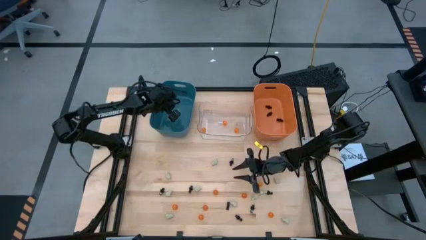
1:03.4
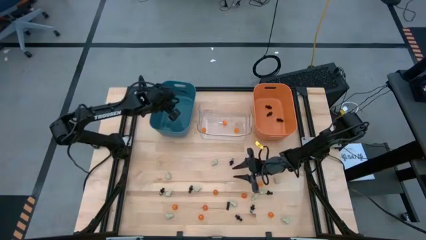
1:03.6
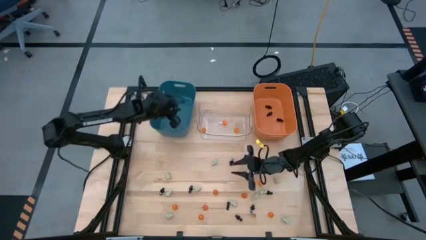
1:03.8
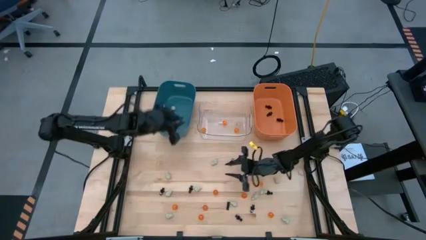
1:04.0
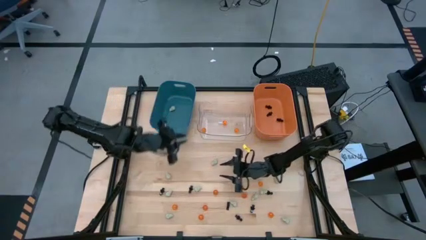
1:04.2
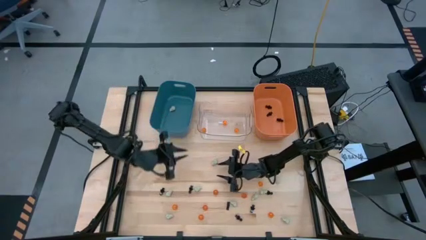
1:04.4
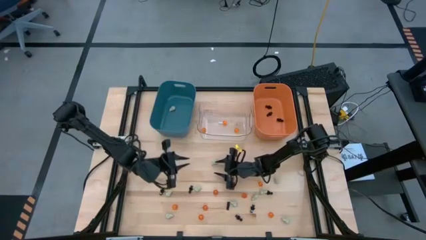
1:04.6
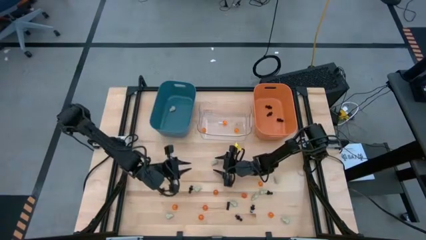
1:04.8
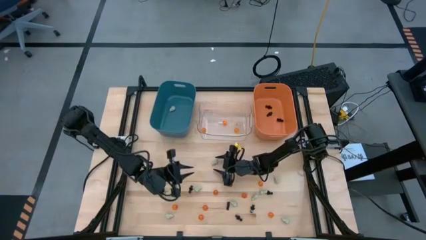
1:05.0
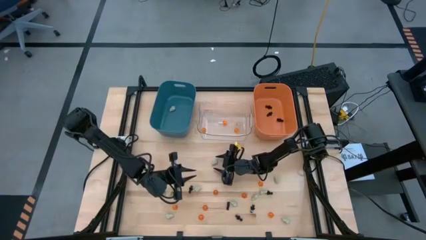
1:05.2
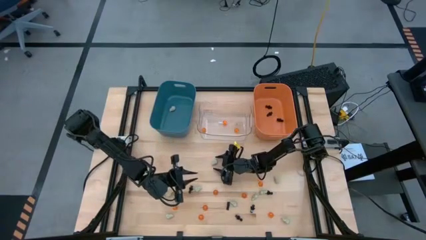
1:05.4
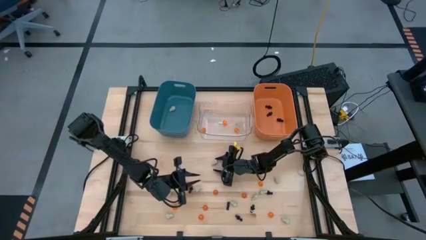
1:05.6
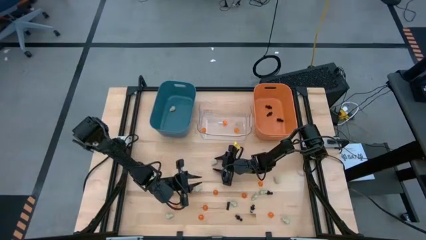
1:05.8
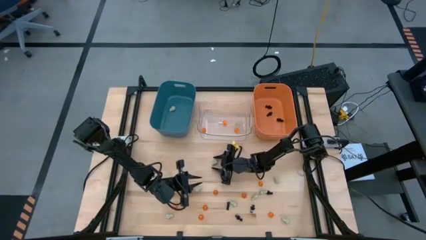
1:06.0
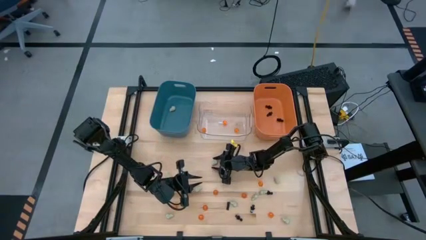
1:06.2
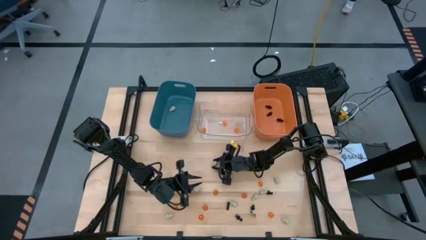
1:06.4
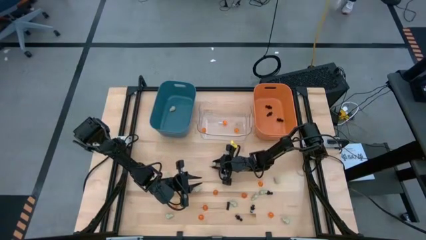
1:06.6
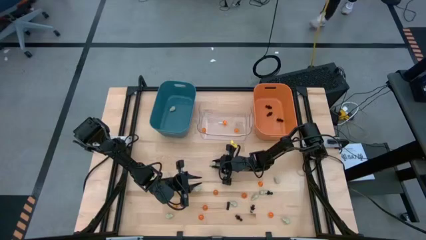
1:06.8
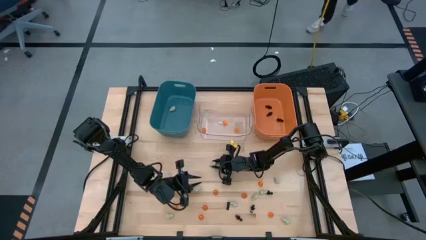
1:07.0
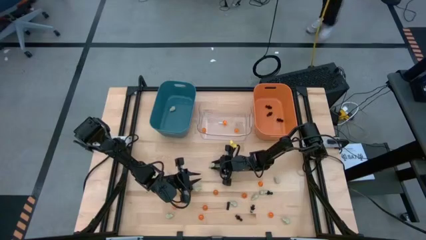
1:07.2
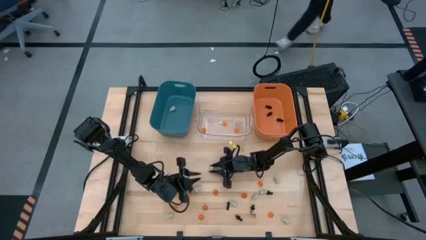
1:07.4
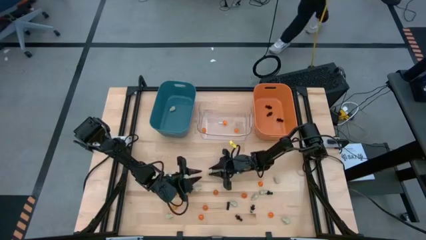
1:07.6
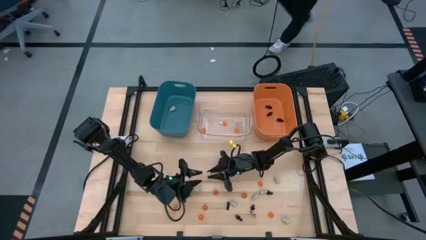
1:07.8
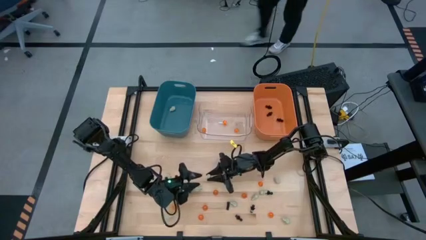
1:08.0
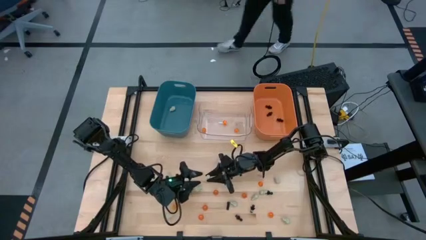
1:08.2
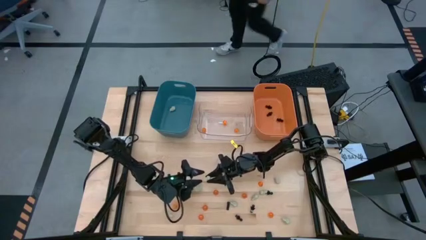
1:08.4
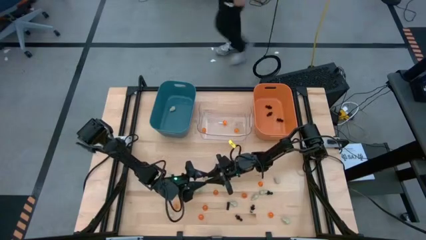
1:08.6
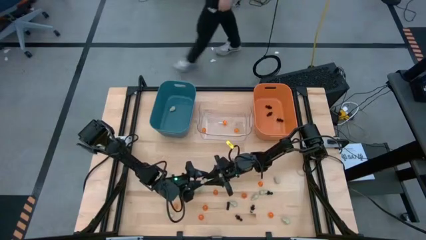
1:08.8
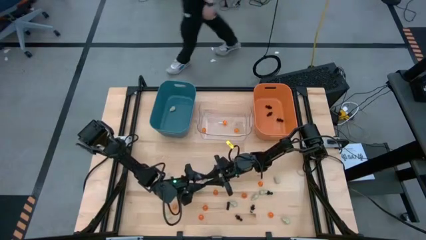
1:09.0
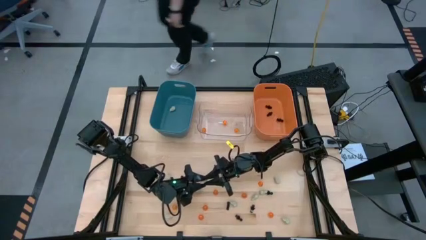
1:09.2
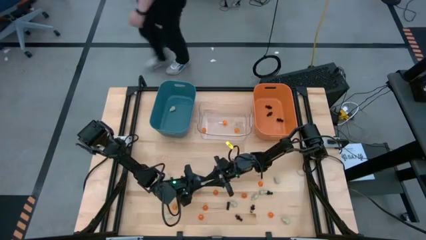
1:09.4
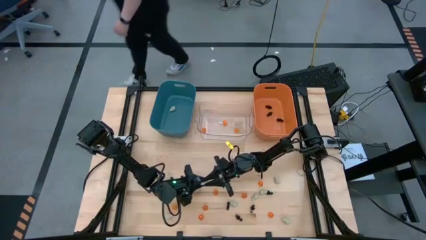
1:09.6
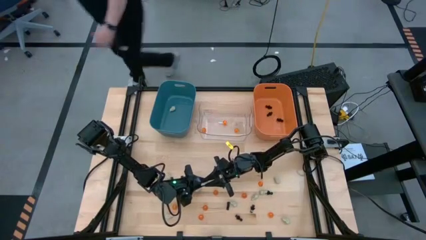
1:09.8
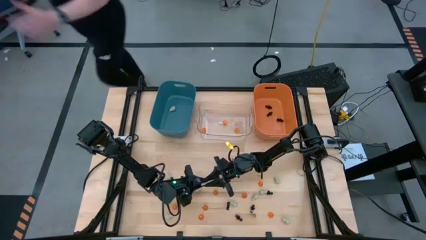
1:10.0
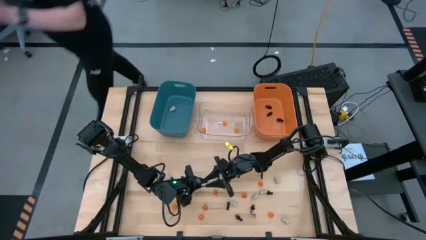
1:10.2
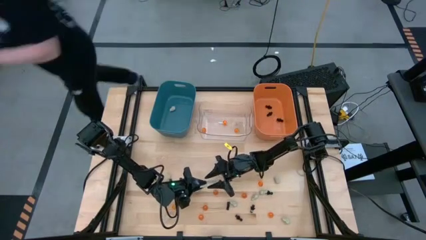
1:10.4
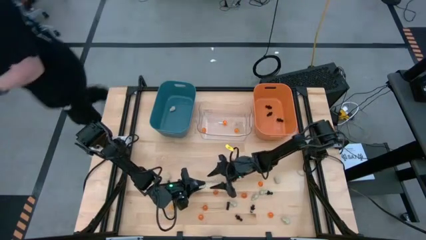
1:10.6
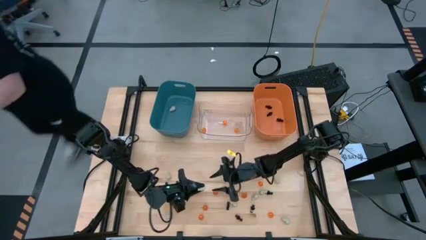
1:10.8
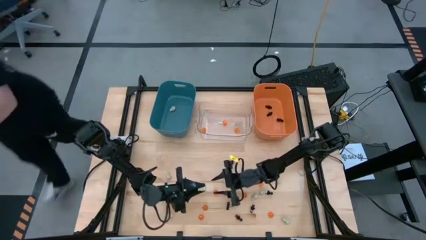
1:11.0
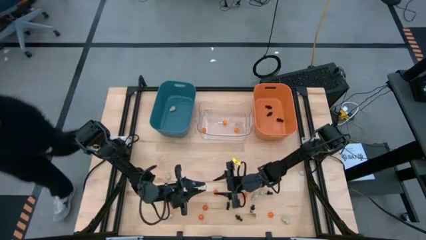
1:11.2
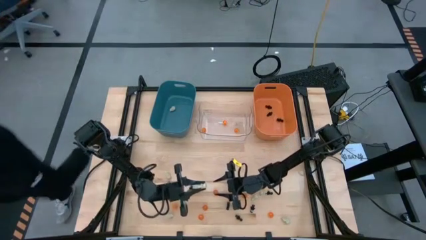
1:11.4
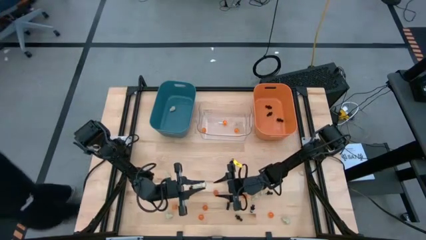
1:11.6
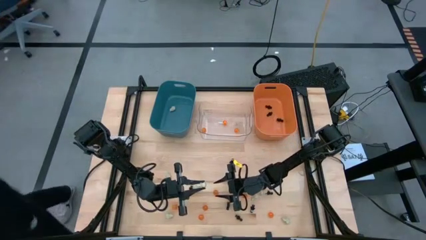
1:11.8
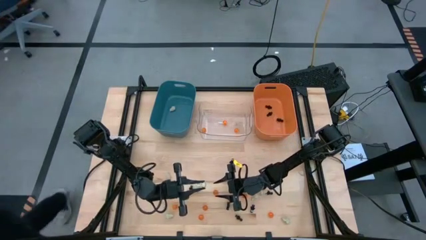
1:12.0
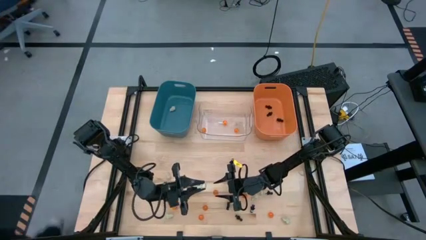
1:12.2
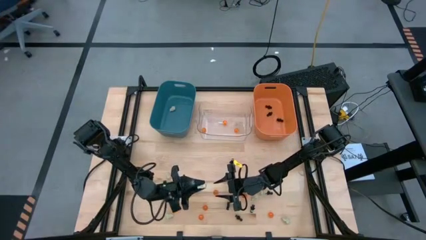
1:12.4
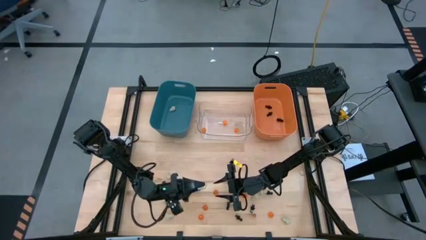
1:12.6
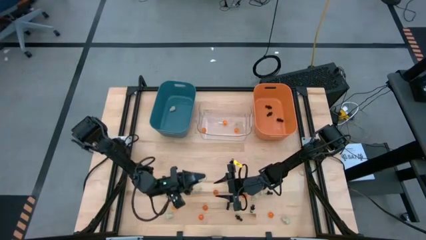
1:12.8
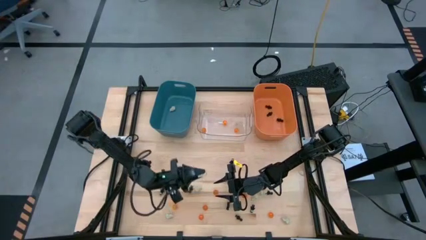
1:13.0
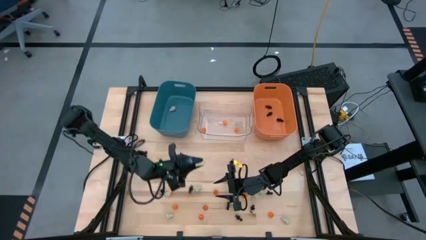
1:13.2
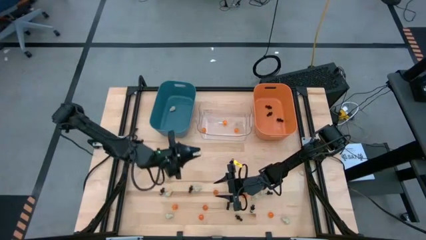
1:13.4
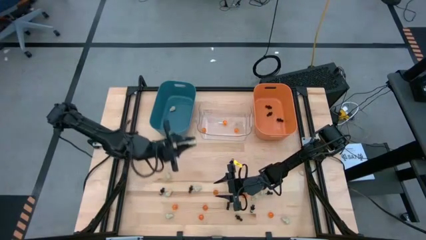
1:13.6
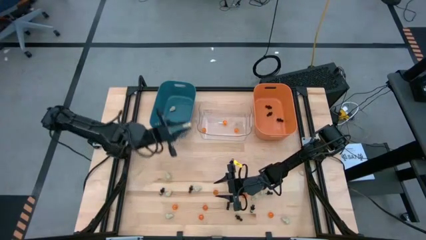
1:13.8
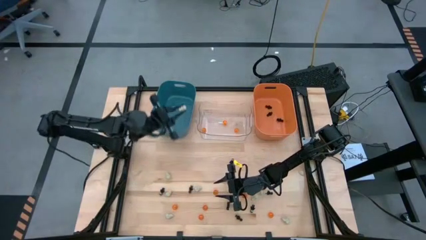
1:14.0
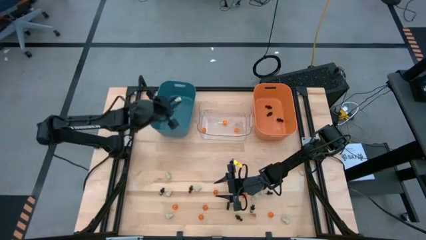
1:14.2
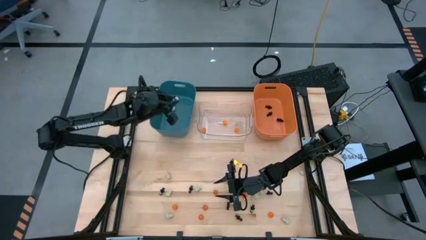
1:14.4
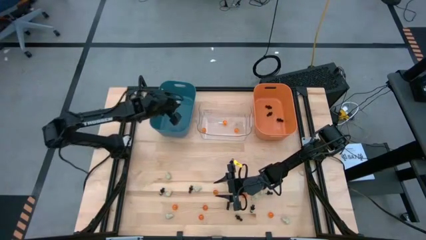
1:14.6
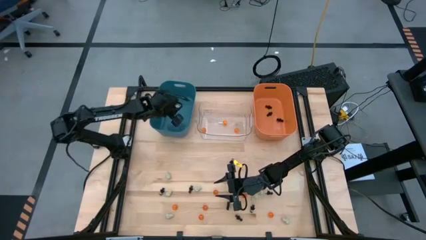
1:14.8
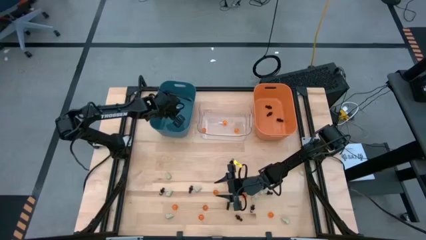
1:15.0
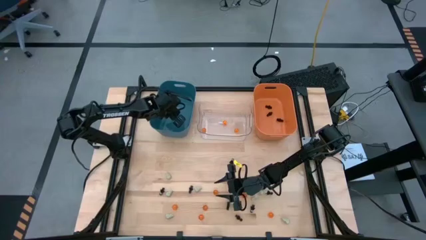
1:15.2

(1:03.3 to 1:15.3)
Task: Sort Halloween decoration
Put the white skull toy into the blue bin

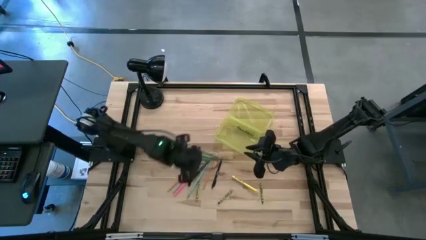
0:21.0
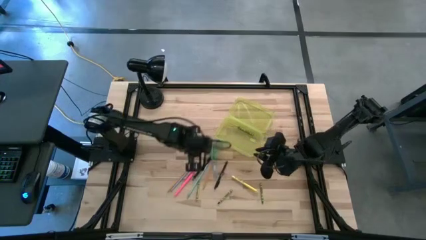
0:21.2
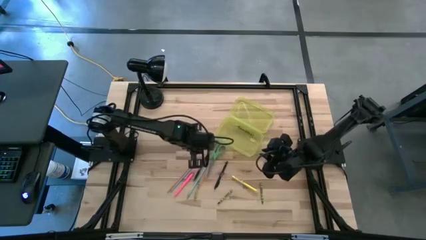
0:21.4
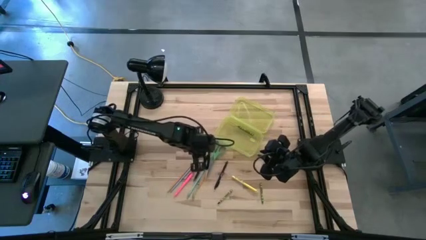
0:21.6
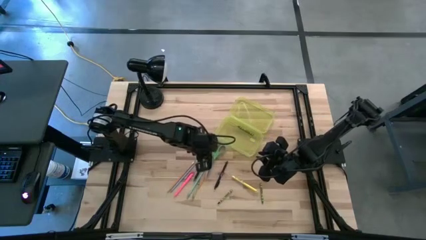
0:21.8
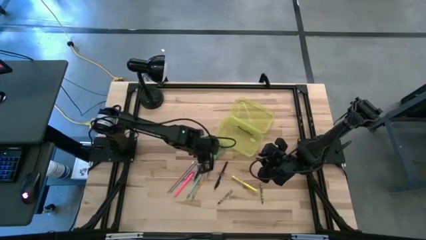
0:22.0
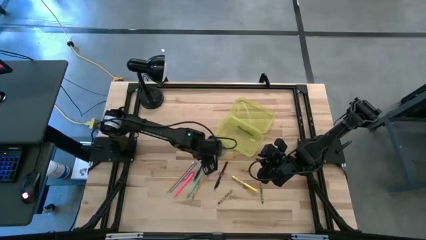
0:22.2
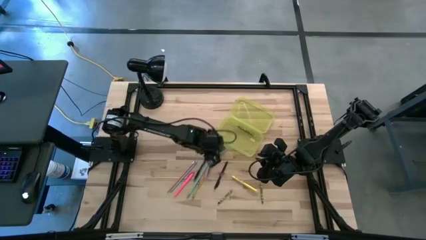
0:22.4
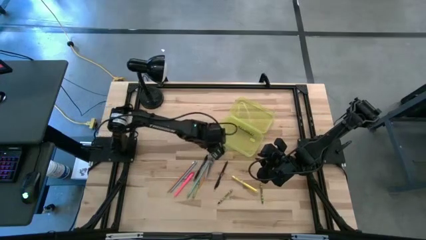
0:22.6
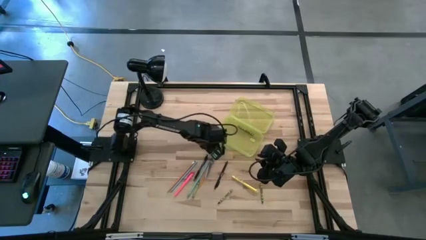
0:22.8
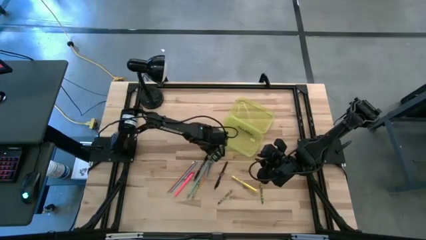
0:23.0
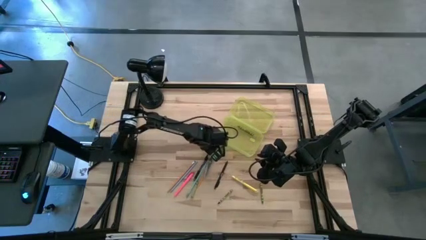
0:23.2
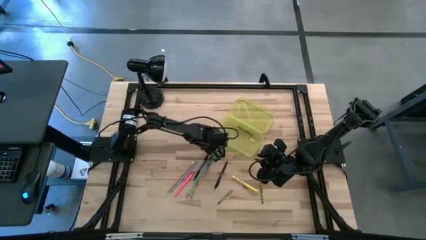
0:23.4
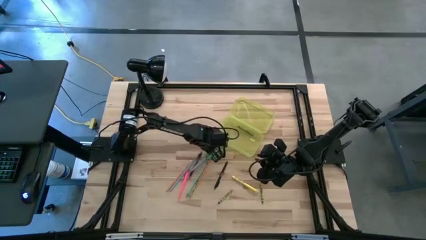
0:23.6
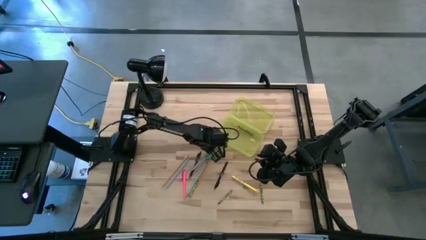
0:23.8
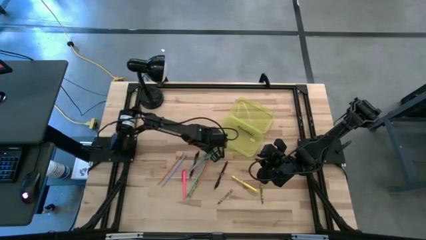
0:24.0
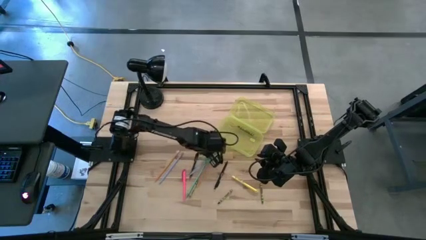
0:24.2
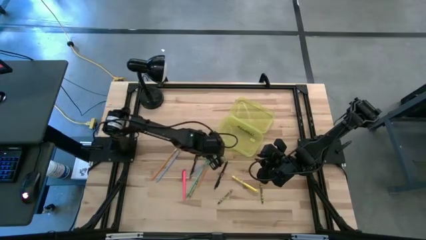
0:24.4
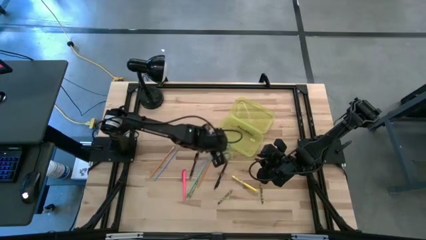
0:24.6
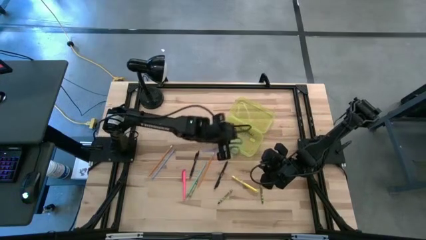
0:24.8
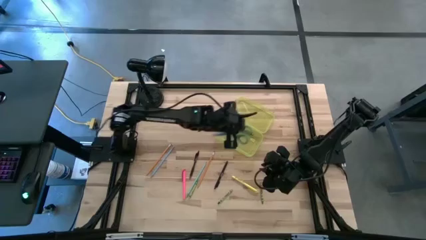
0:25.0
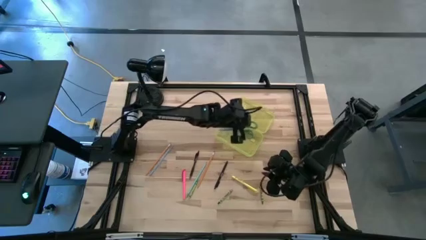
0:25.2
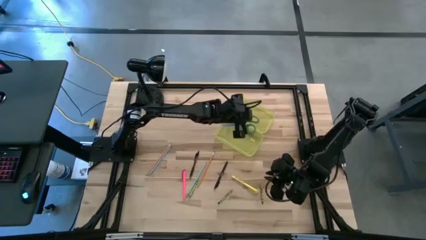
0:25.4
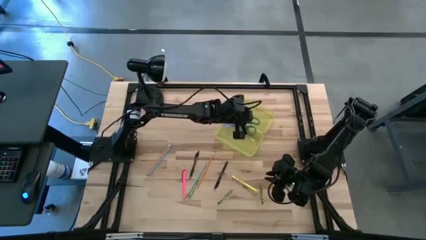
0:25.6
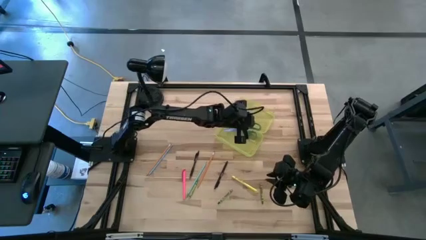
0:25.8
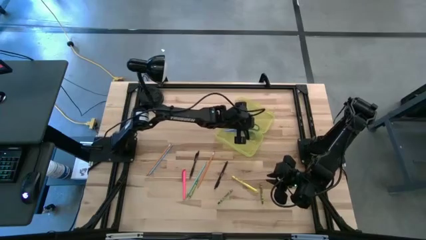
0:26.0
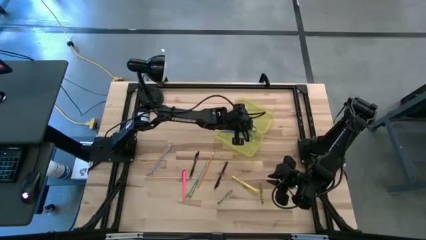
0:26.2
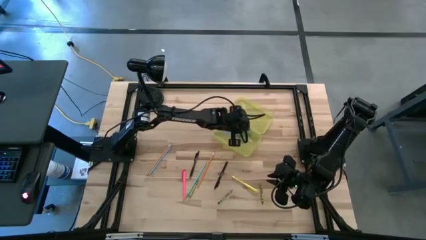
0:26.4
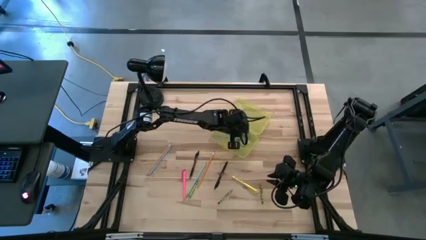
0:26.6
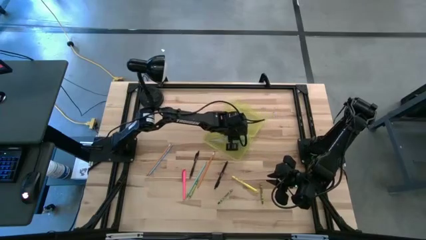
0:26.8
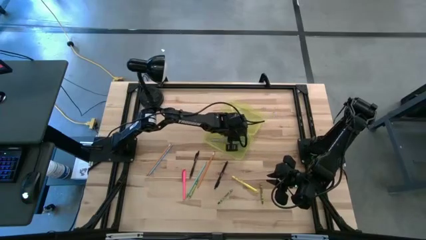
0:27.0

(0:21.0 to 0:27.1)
Task: Pick & place school supplies into a supply box
Put the green scissors into the yellow supply box
